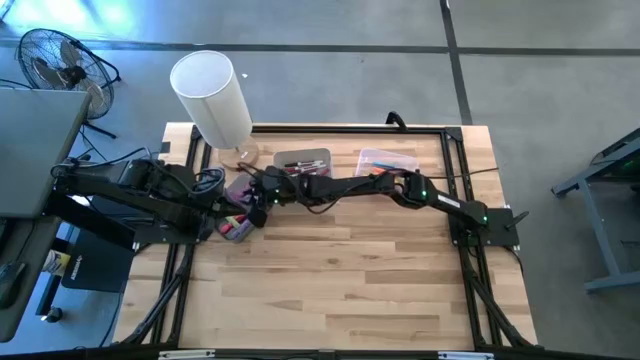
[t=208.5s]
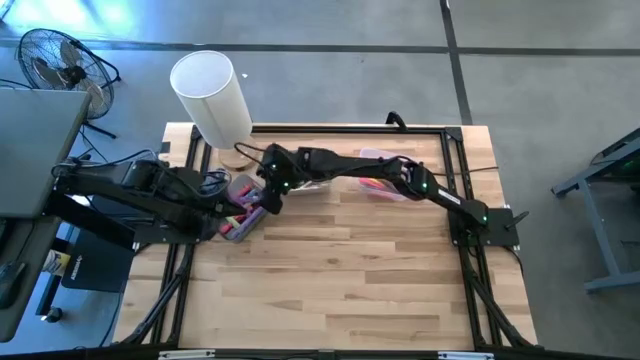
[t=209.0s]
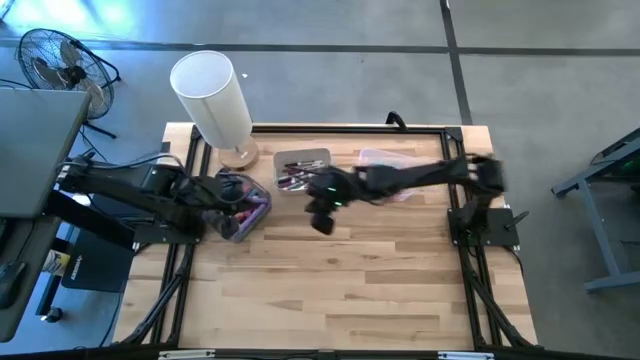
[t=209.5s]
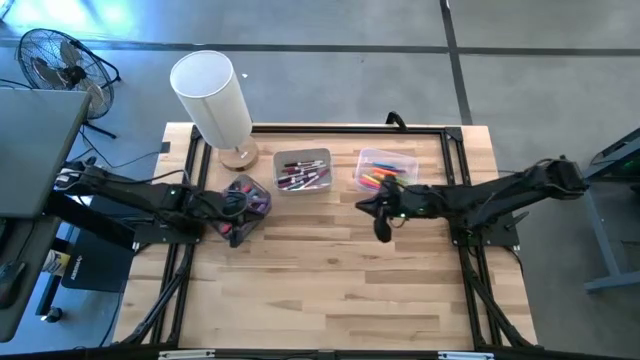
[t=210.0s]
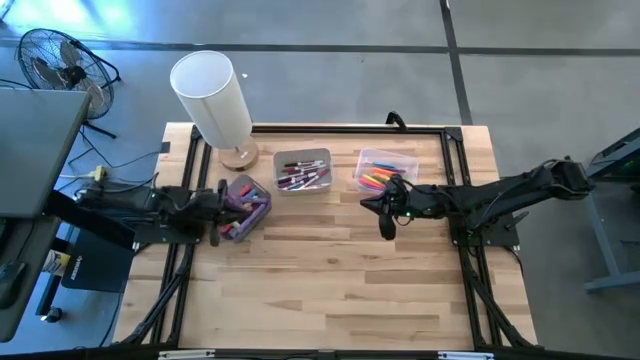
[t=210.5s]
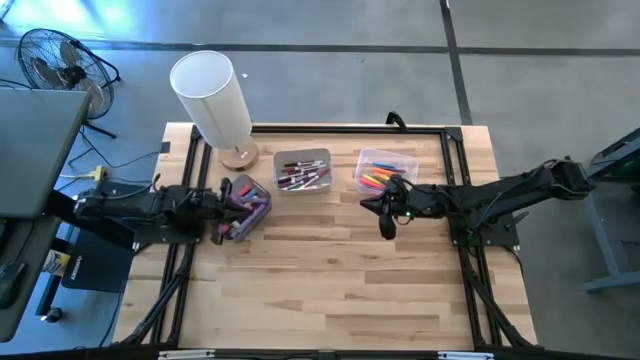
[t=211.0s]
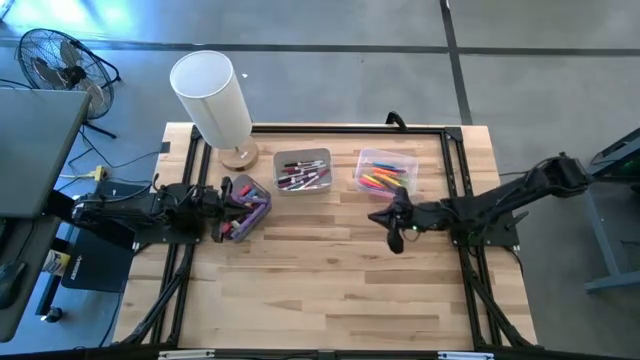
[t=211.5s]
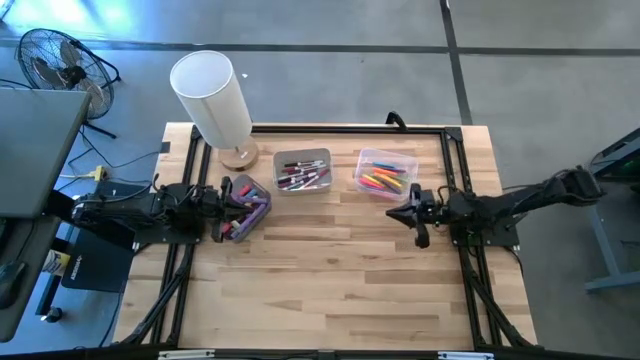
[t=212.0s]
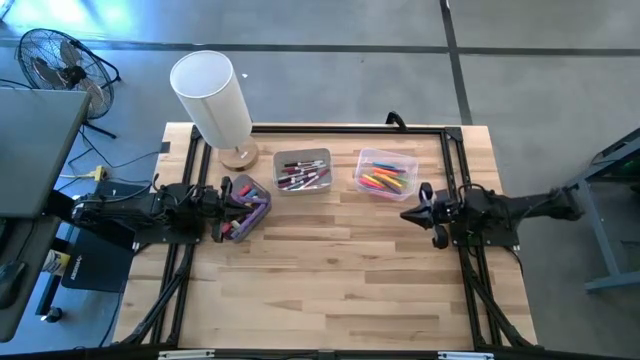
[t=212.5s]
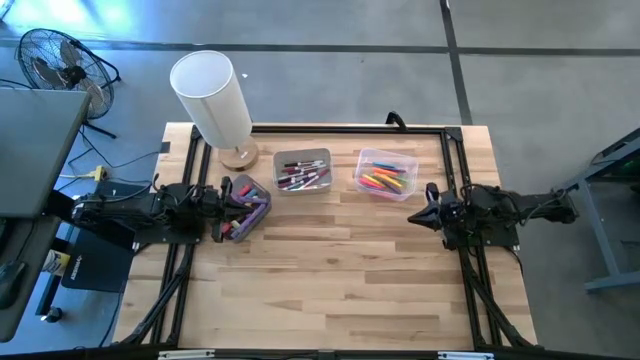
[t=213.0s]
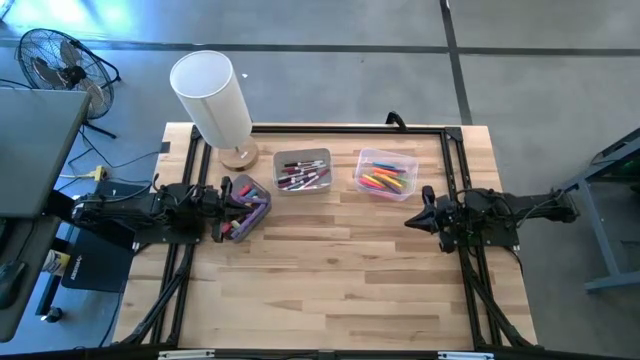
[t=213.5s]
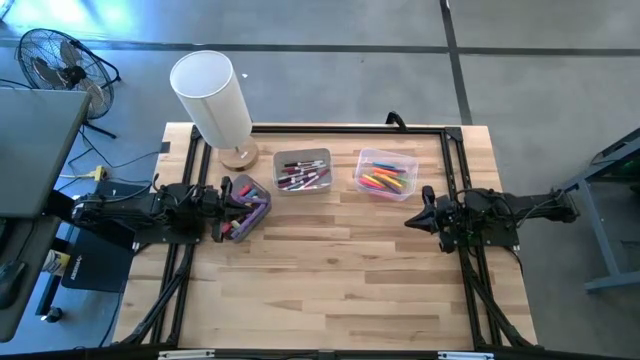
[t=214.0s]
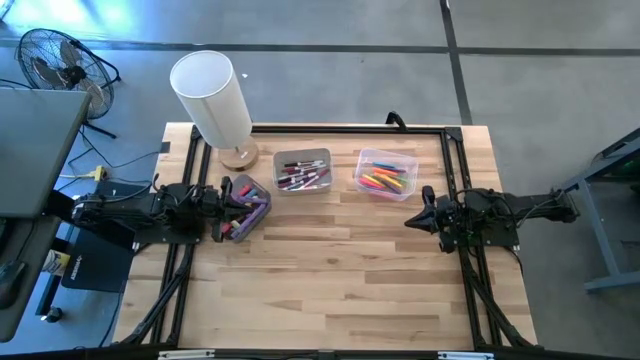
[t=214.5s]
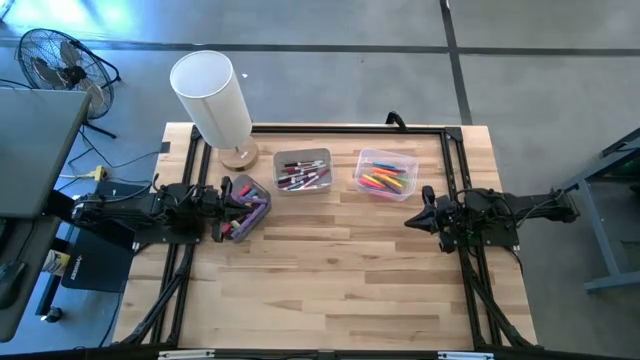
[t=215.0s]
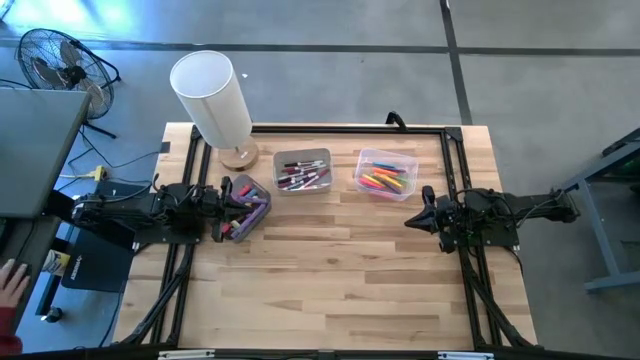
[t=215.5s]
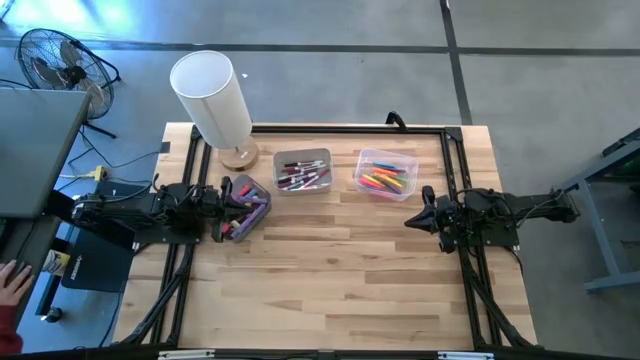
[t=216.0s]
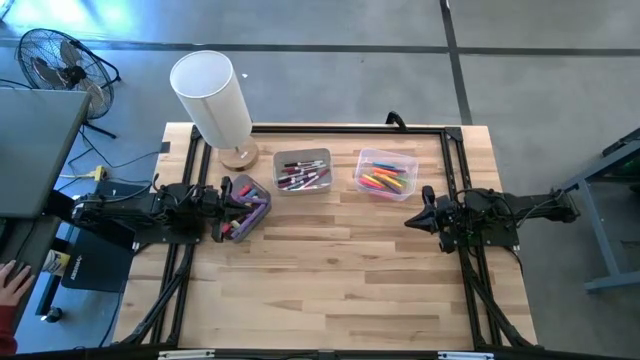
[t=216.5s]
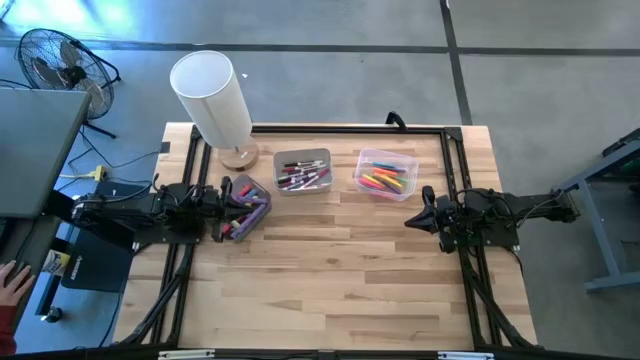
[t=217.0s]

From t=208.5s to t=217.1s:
Task: Pick & Place Markers
Return to Home Position
